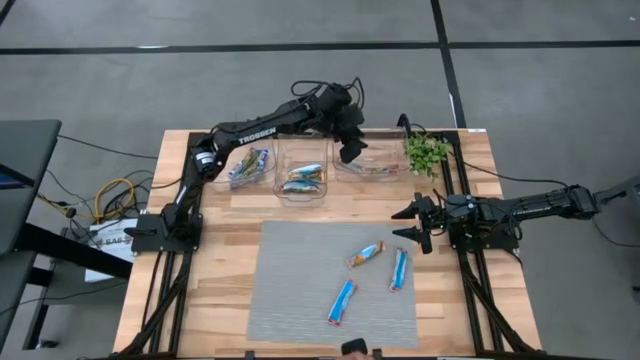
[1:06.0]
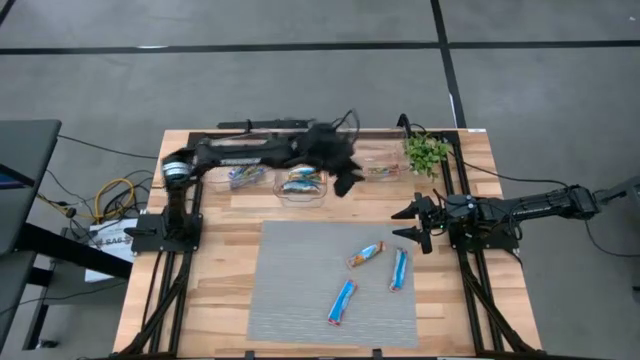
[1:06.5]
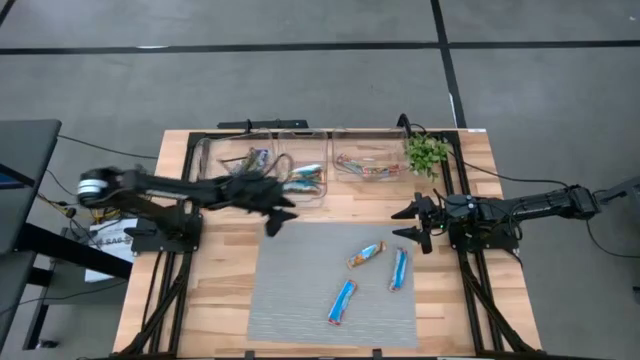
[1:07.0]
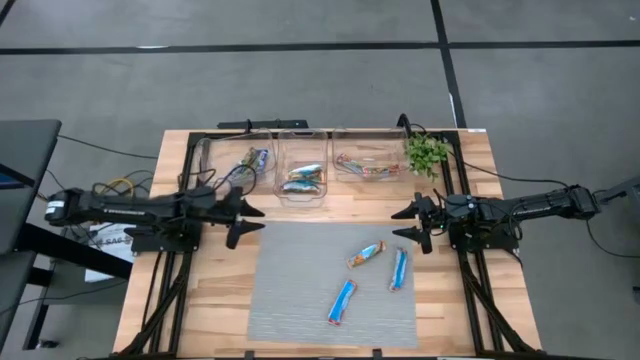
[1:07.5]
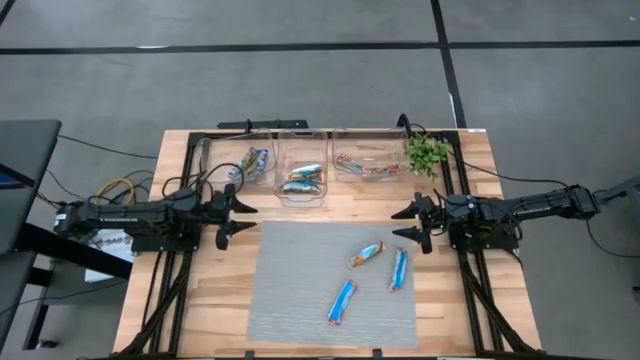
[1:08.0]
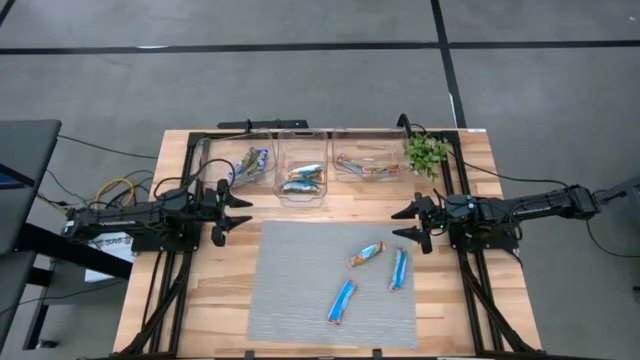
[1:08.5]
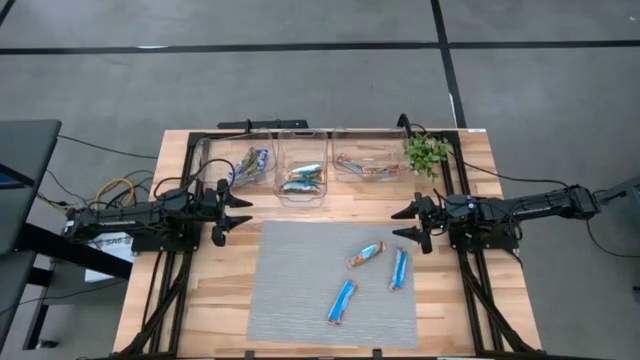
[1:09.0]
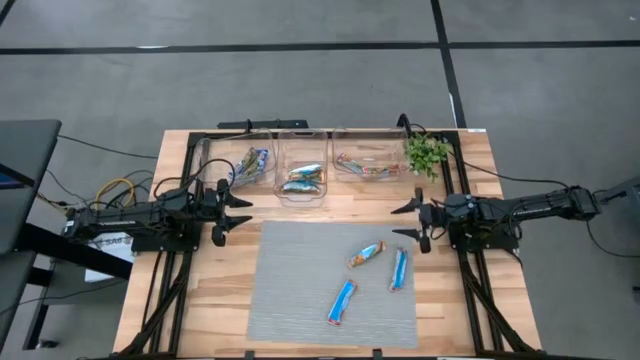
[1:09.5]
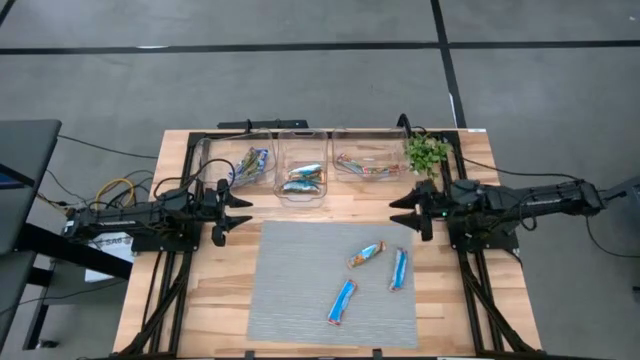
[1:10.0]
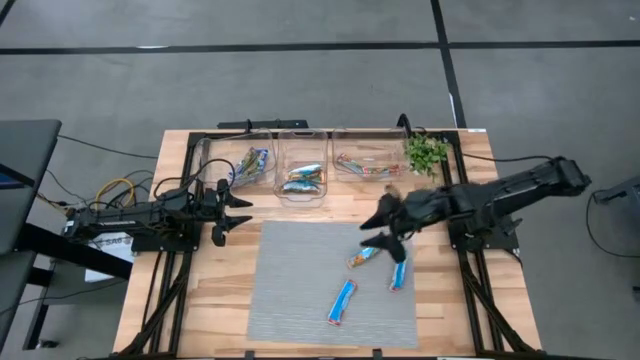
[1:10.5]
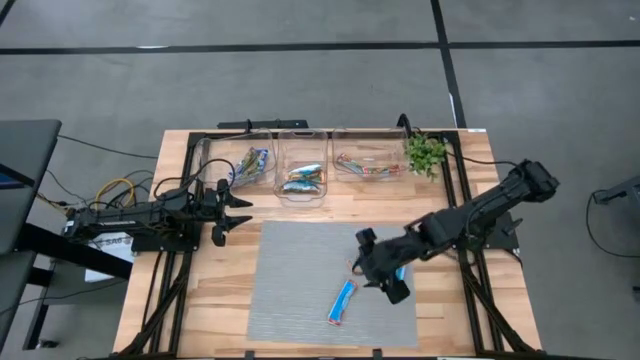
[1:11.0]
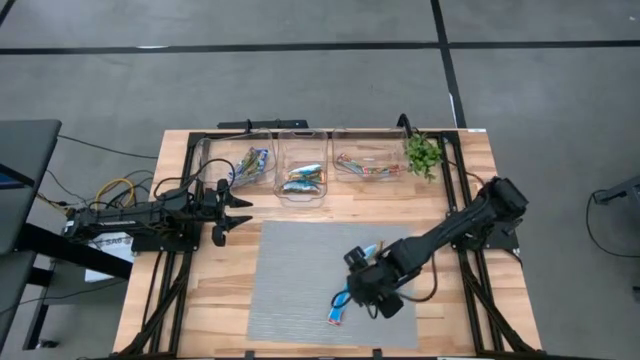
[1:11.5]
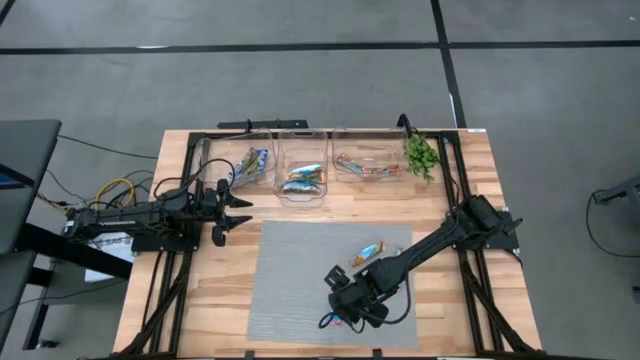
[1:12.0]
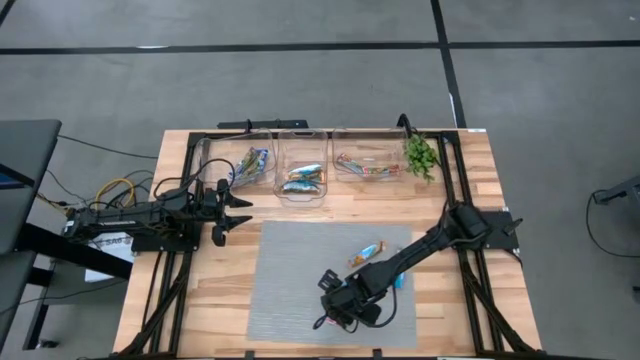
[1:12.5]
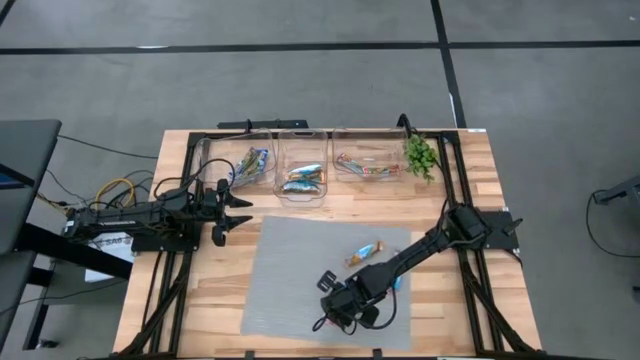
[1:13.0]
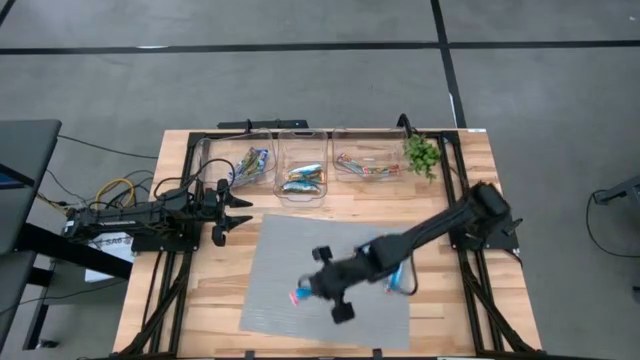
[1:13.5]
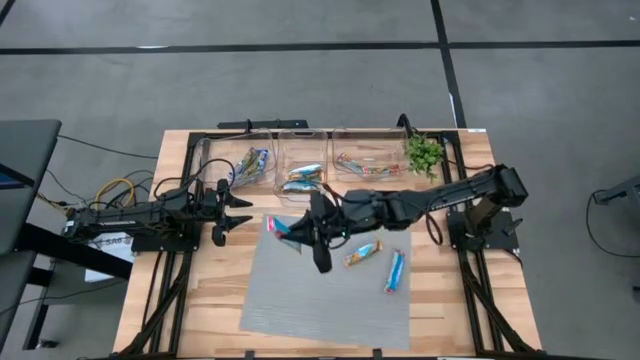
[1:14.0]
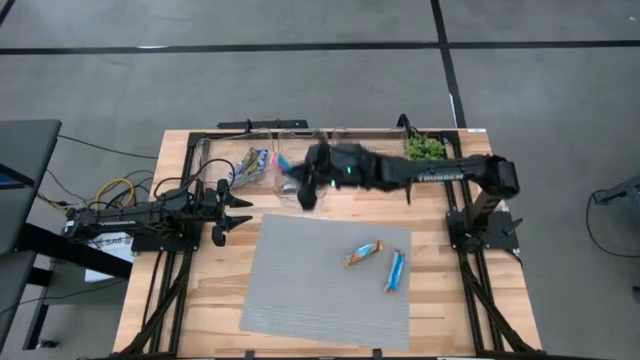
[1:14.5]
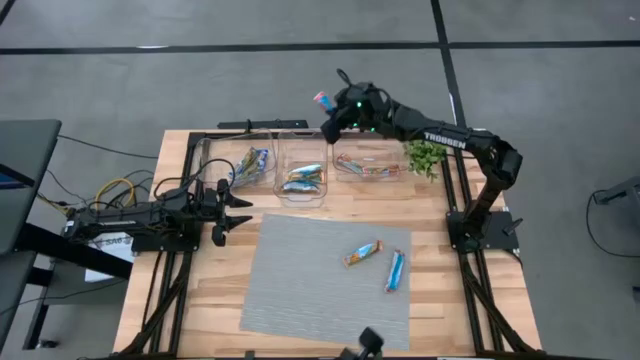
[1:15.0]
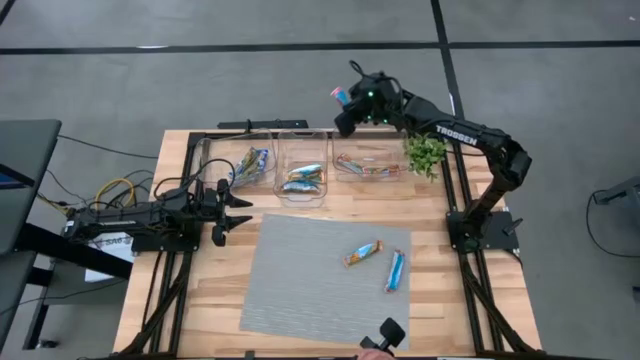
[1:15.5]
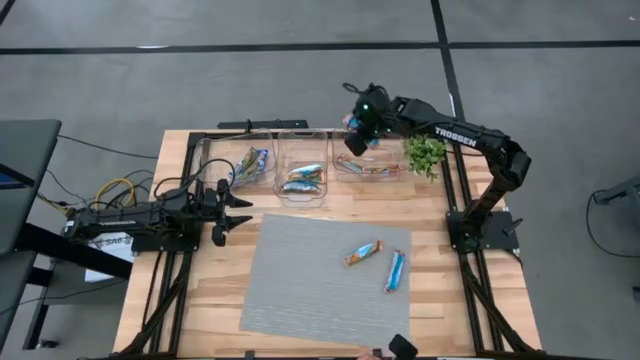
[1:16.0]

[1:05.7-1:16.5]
Task: Pick and place Granola Bars by type
Put the red granola bar into the right transparent bin

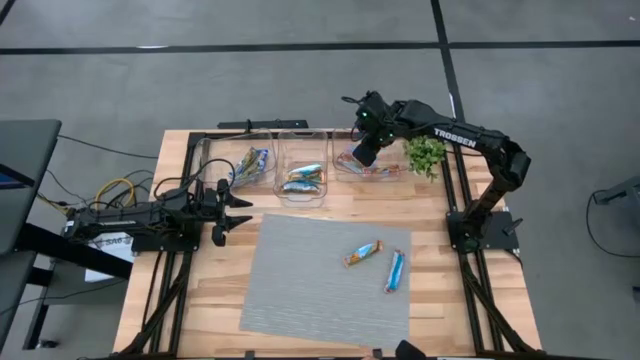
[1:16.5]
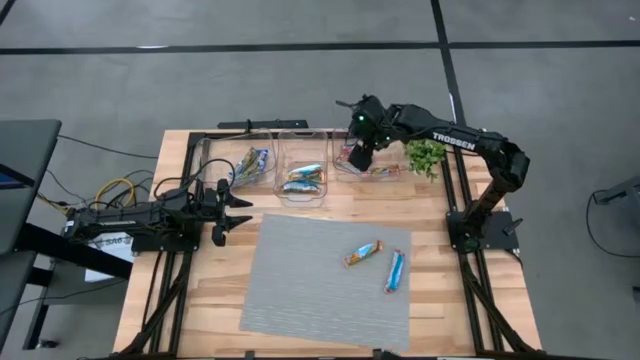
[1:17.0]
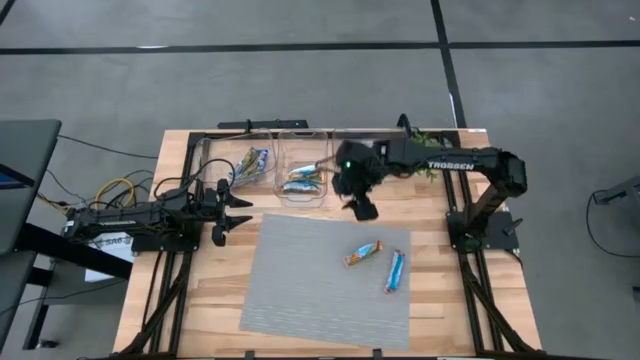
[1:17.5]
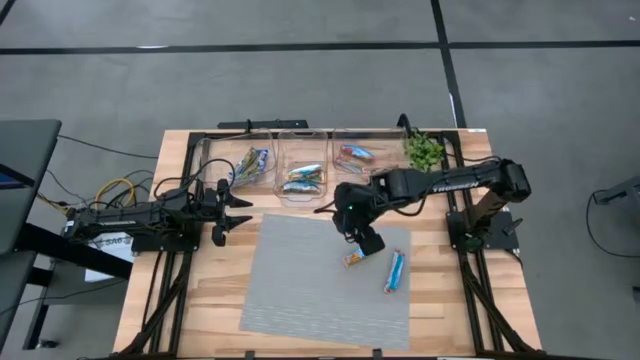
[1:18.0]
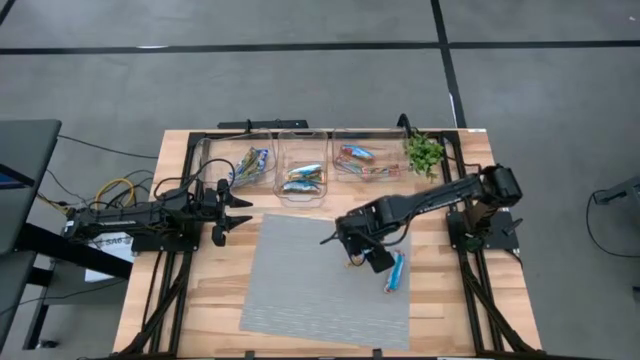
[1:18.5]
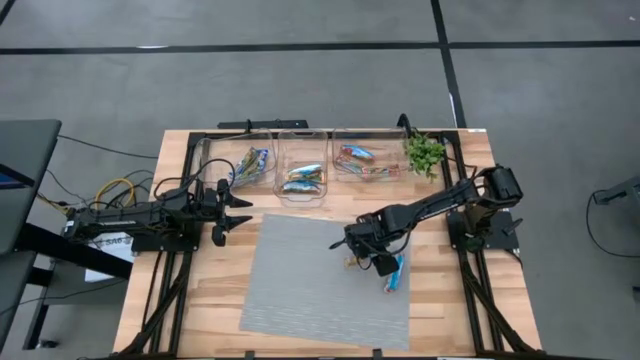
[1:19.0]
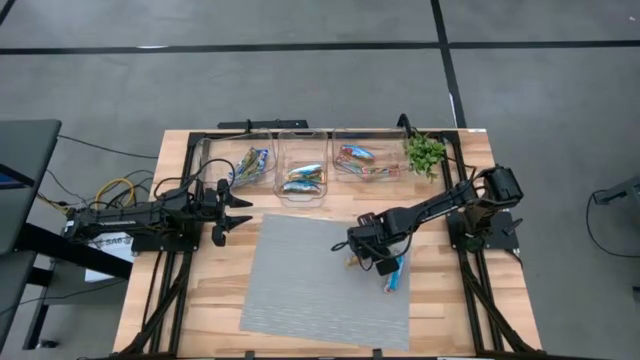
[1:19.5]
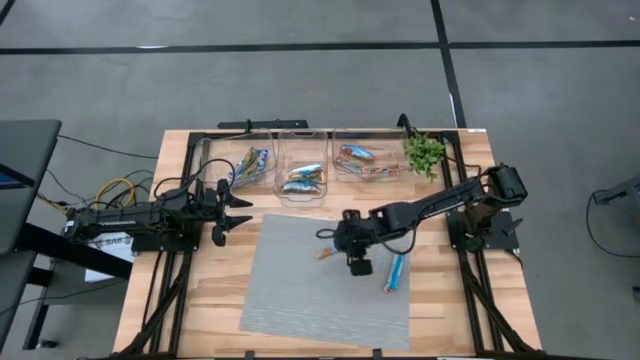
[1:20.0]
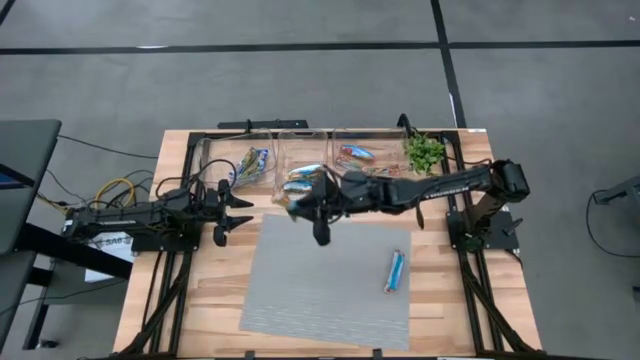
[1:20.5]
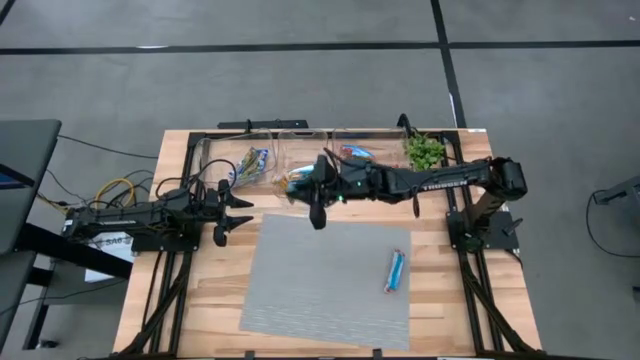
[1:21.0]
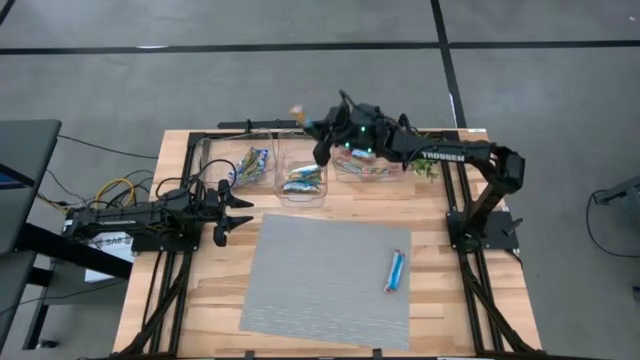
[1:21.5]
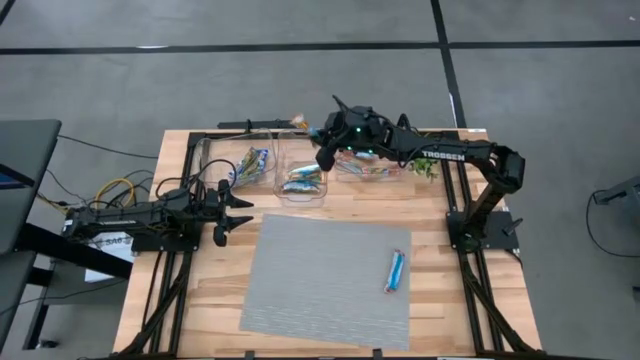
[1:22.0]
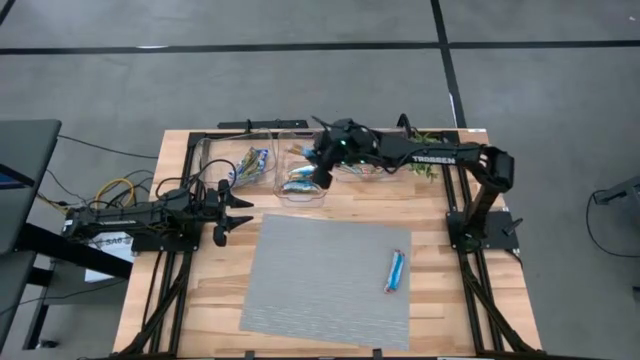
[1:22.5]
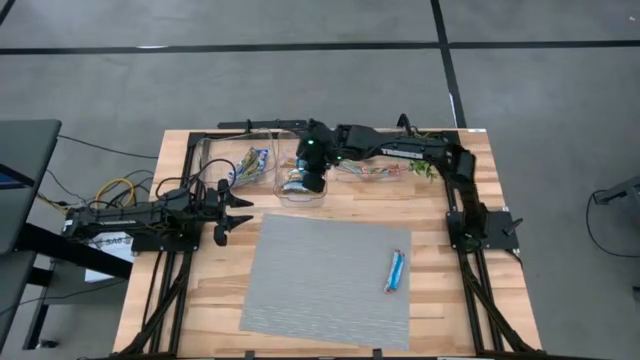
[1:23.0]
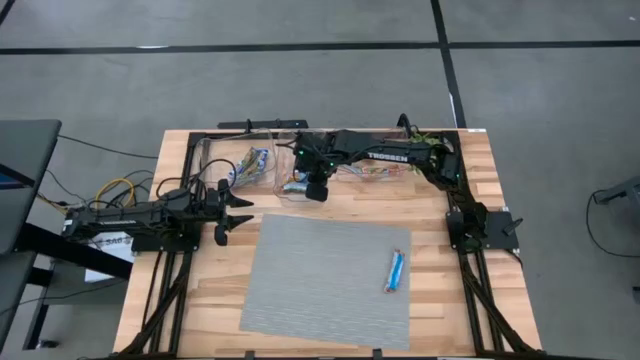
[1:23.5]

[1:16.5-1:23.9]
Put the yellow granola bar into the center transparent bin
